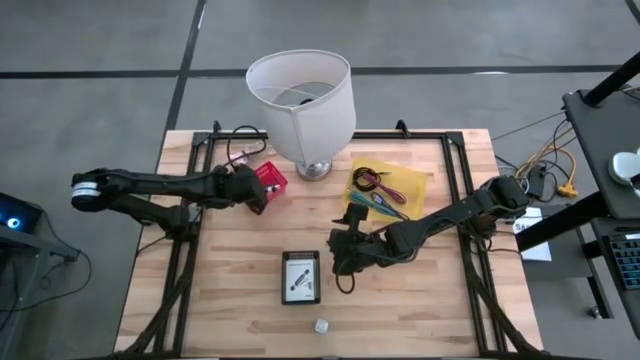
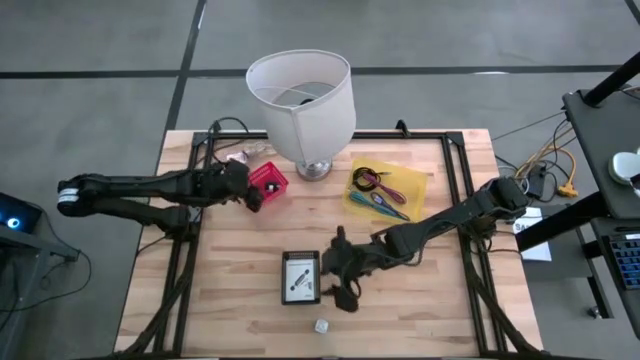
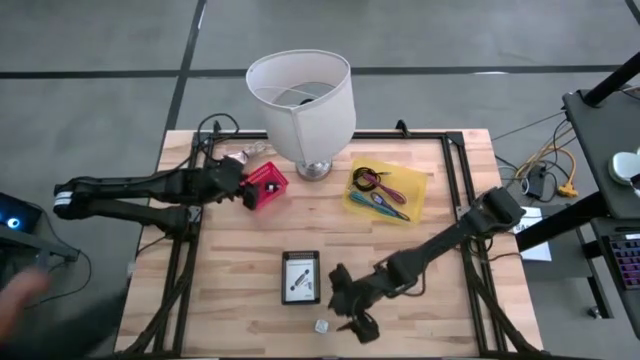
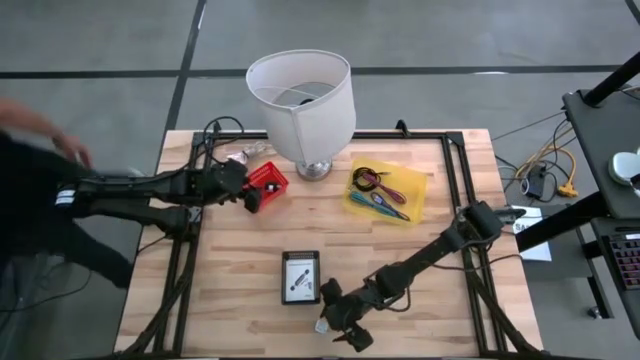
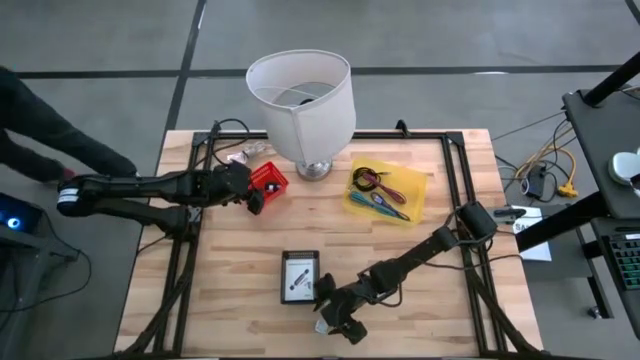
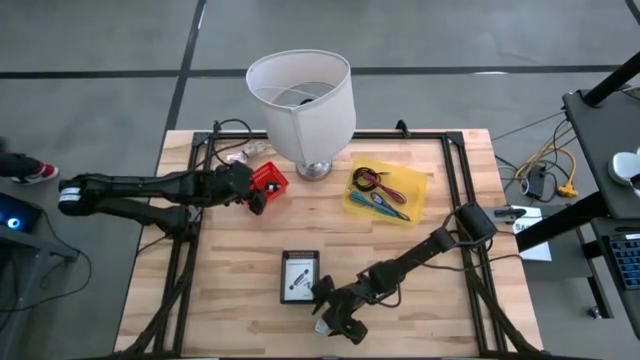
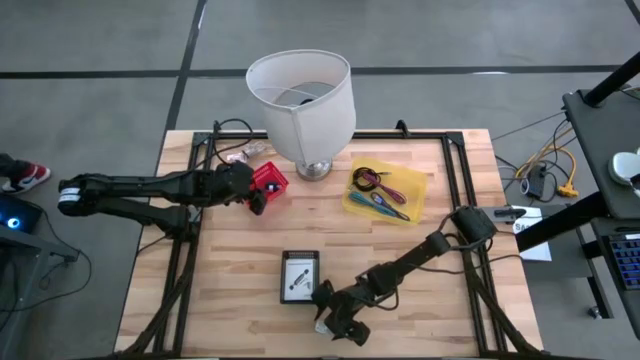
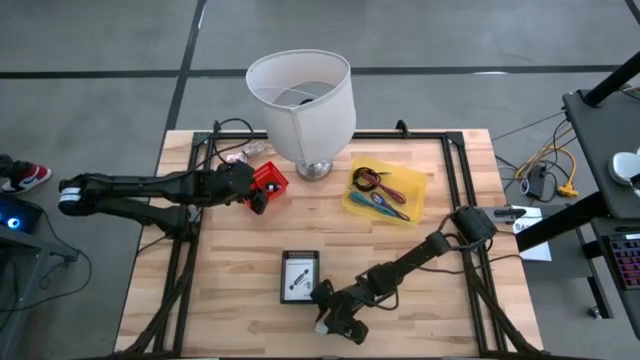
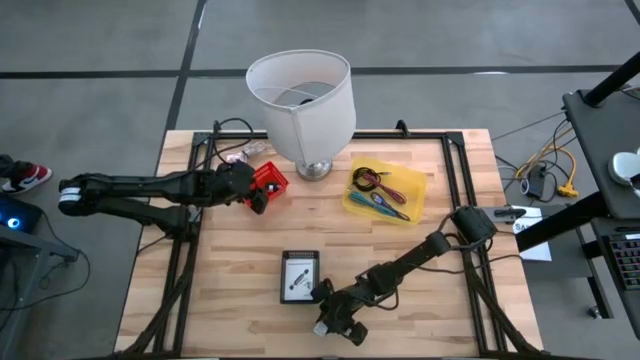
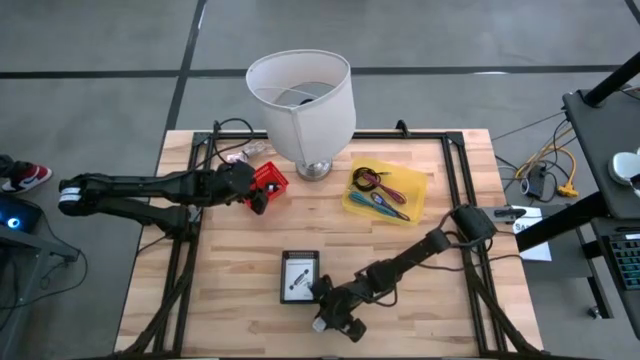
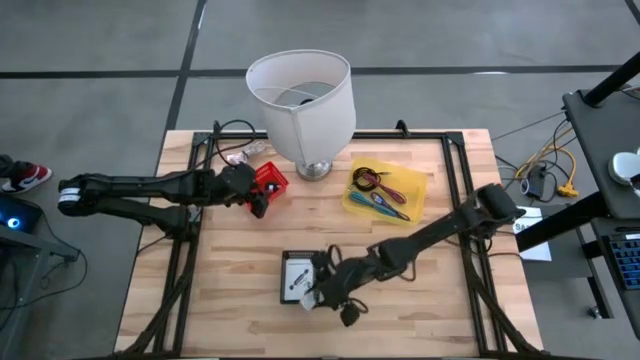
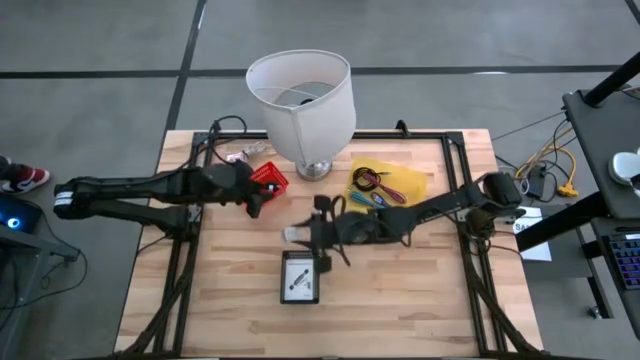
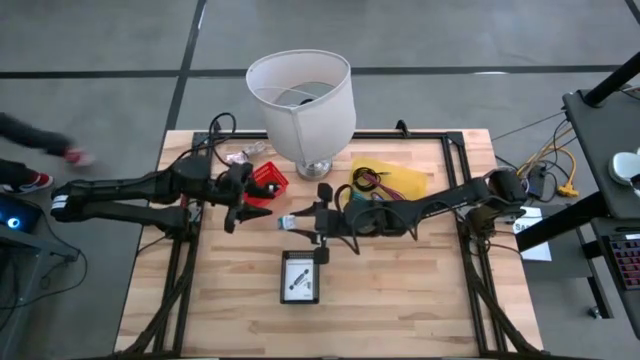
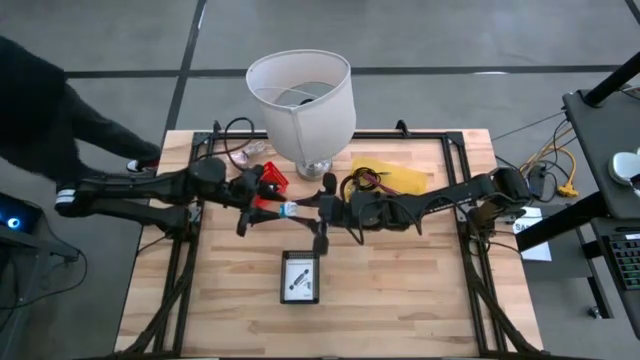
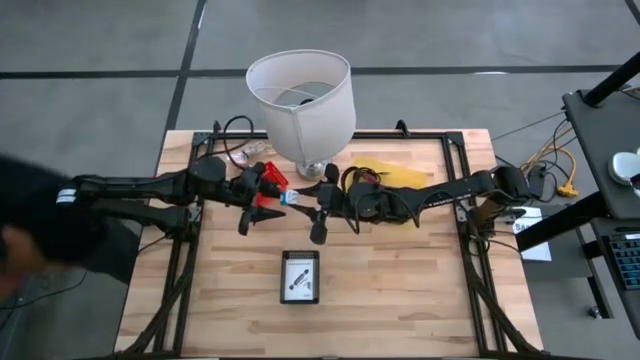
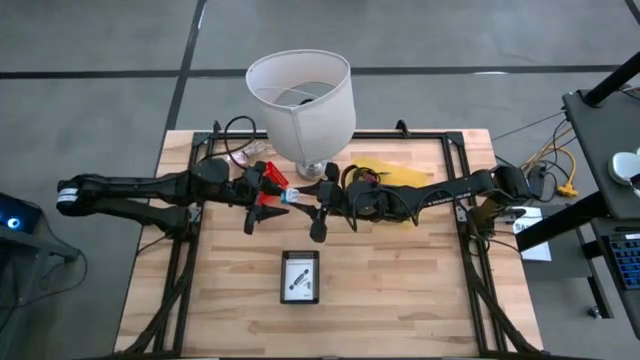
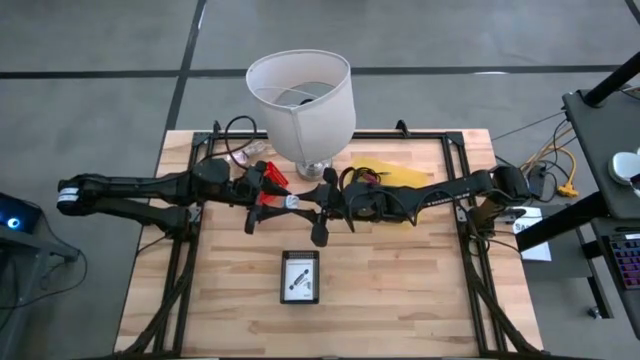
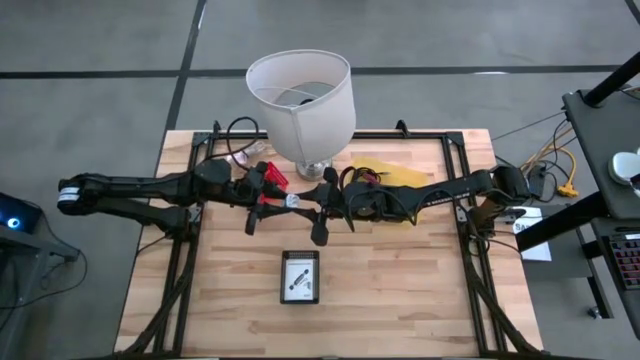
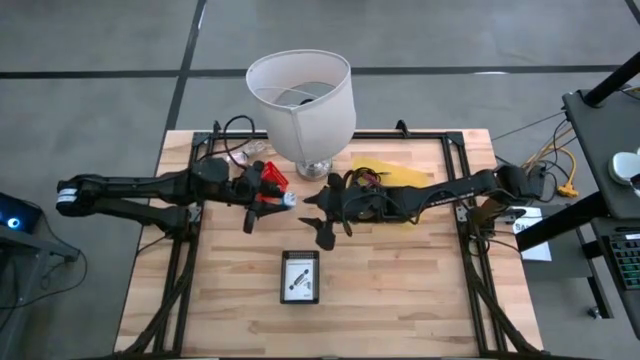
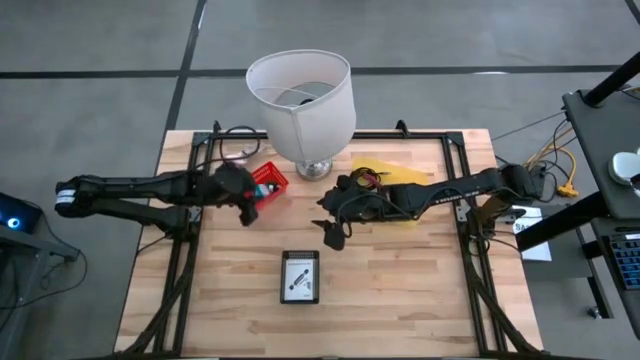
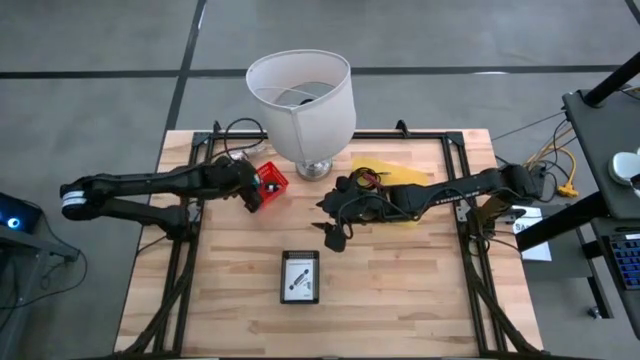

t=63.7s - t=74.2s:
Task: Pick and place items into bin
Put the blue charger adapter into the red bin

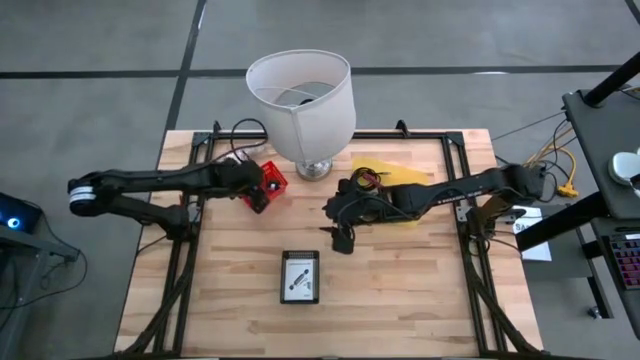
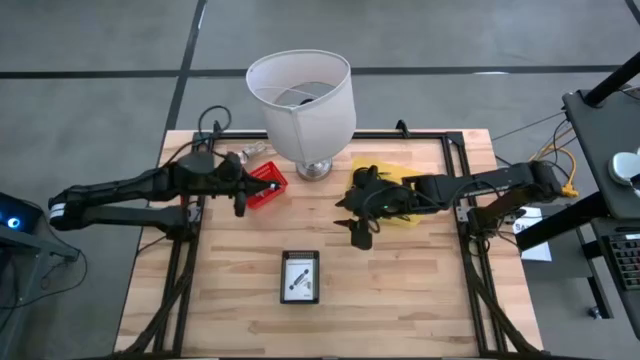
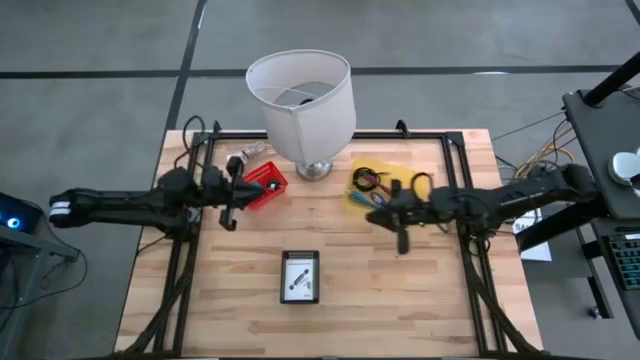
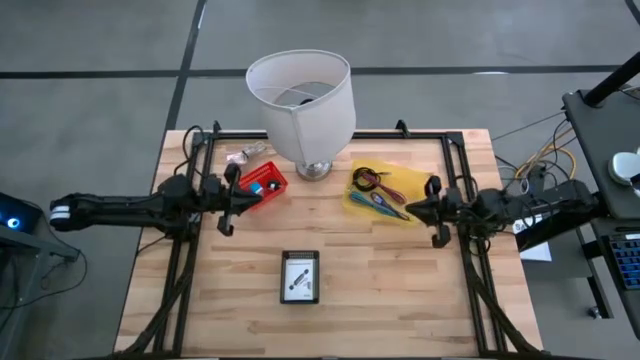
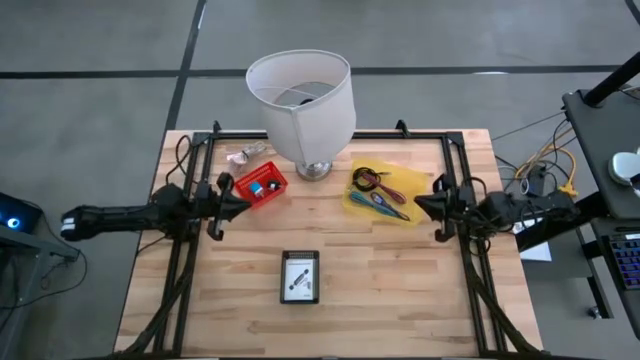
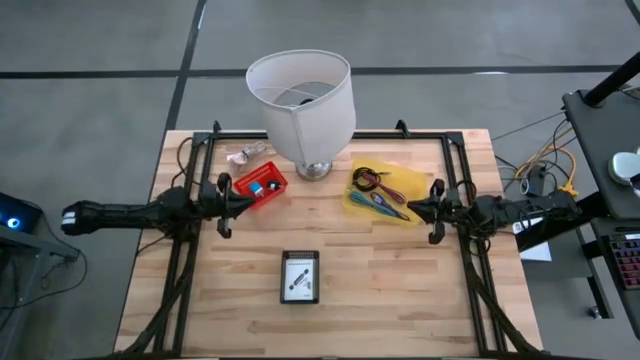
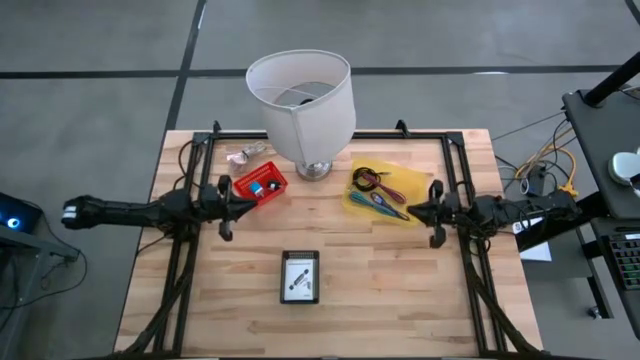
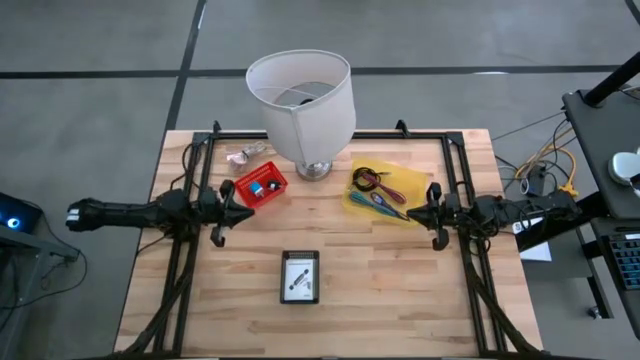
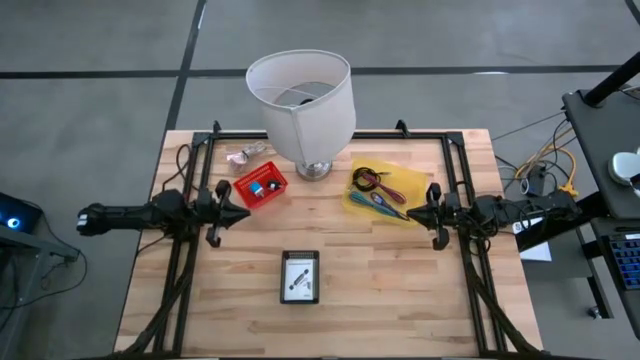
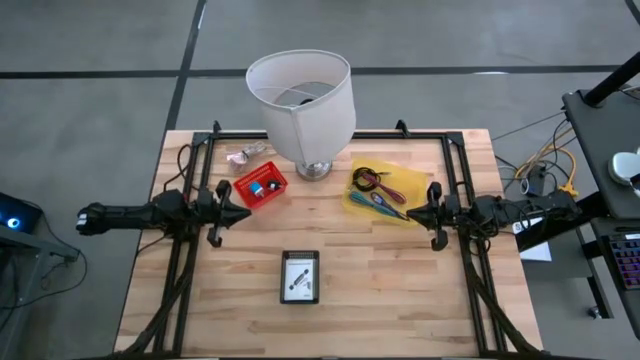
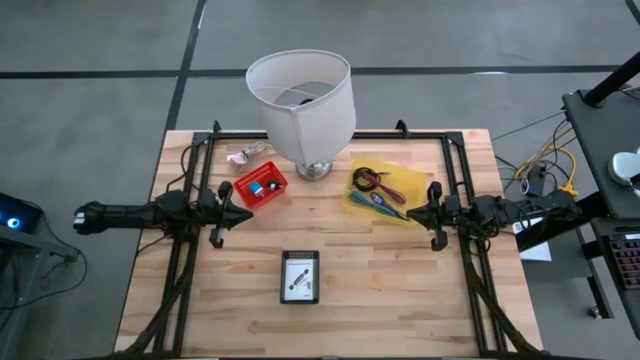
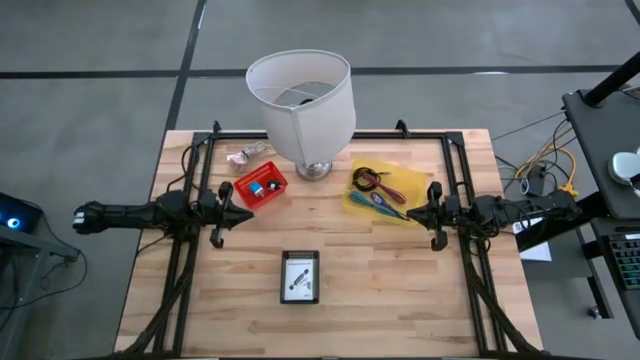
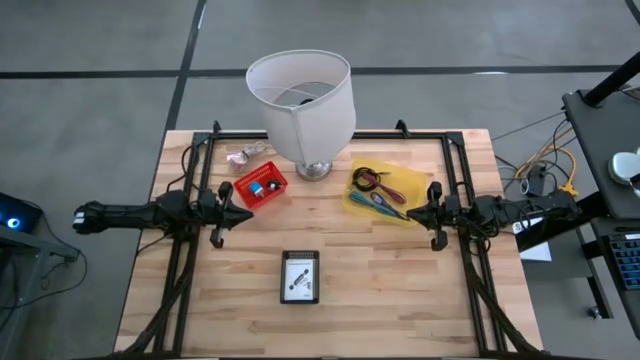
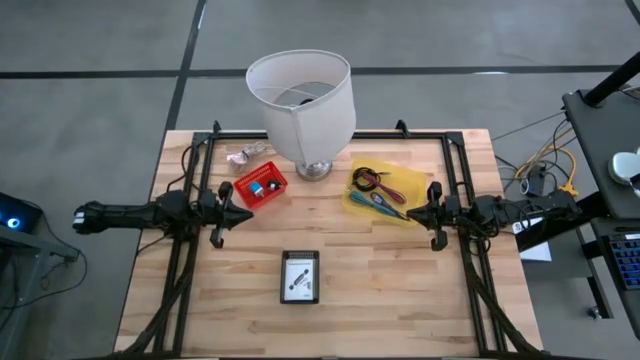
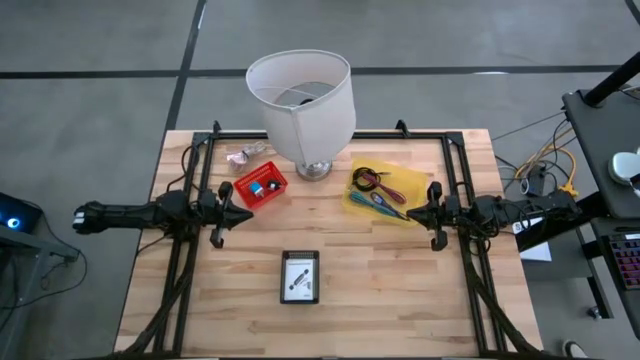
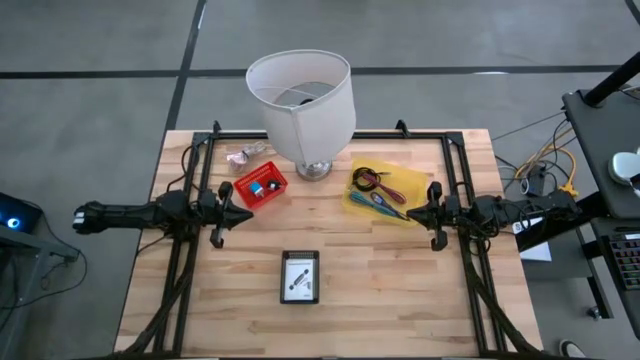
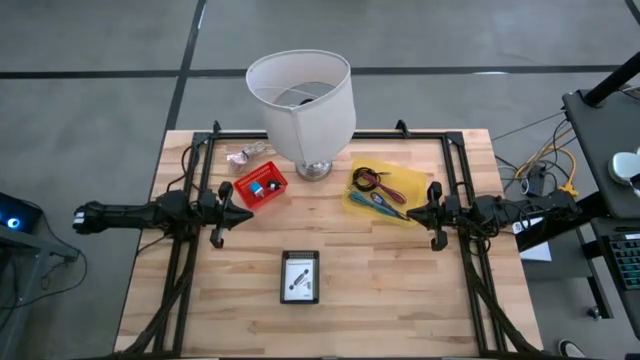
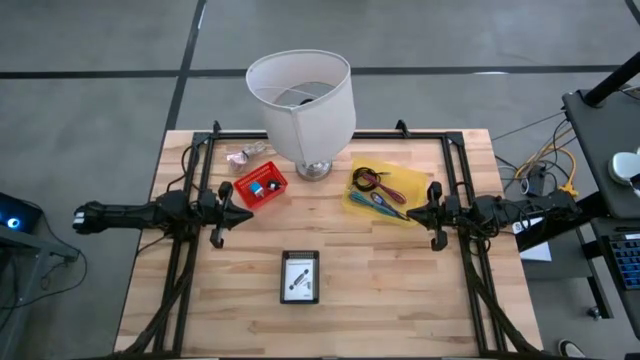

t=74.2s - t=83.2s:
Return to Home Position

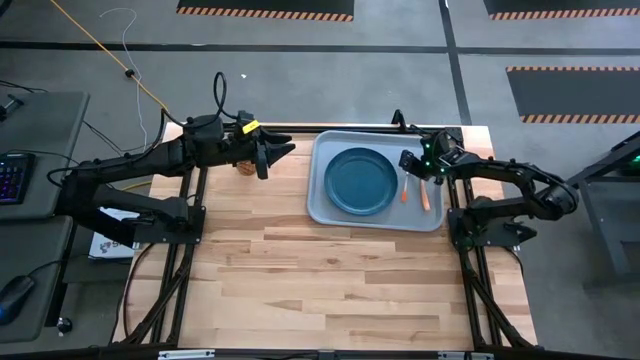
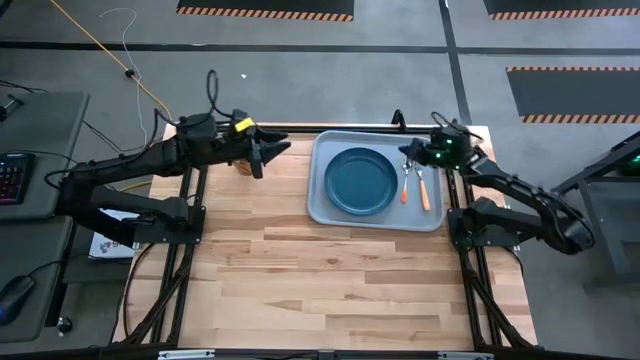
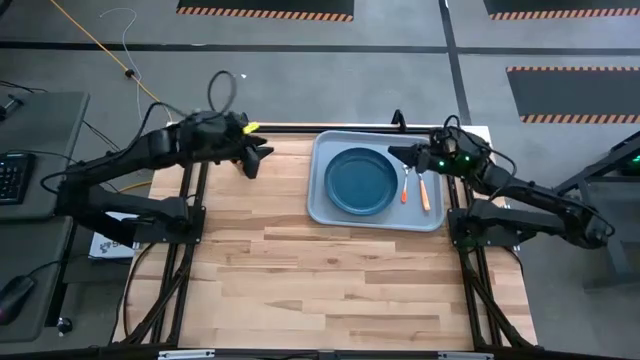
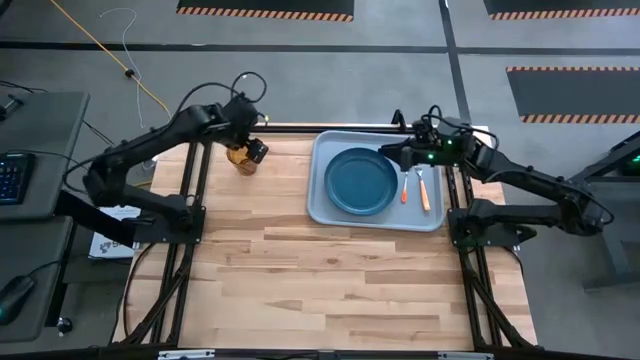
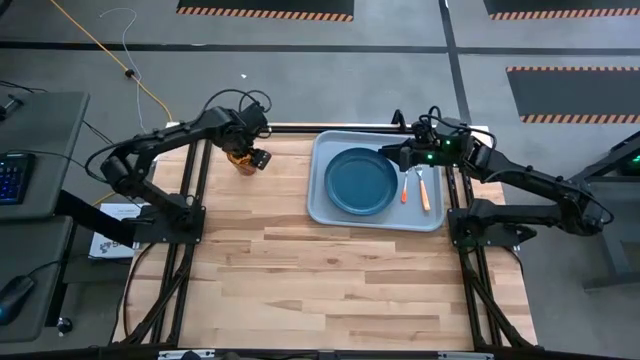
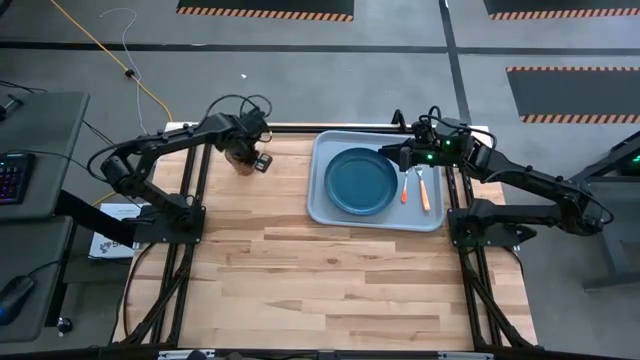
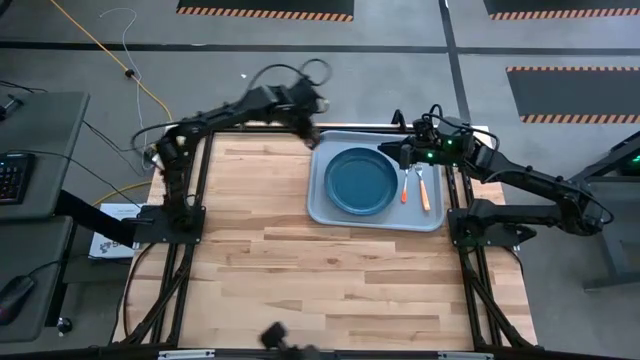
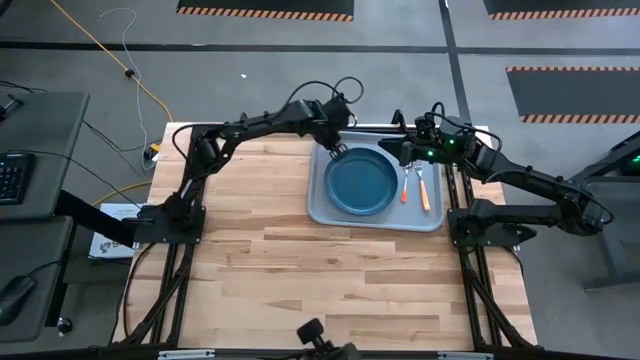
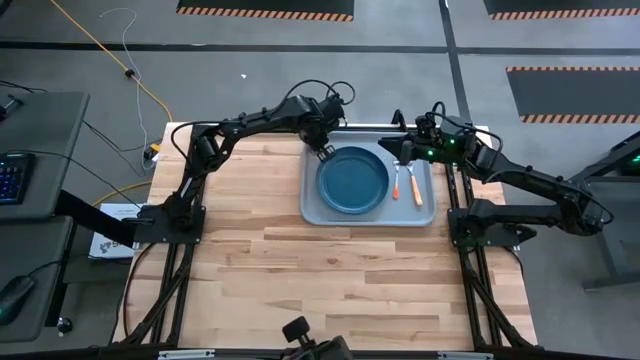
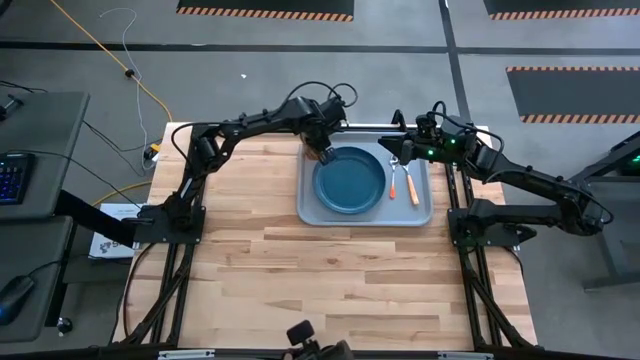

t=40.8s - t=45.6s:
Task: Pick and place plate/cup/fork/spoon on tray
Put the brown cup on the blue tray to the top left of the blue plate
